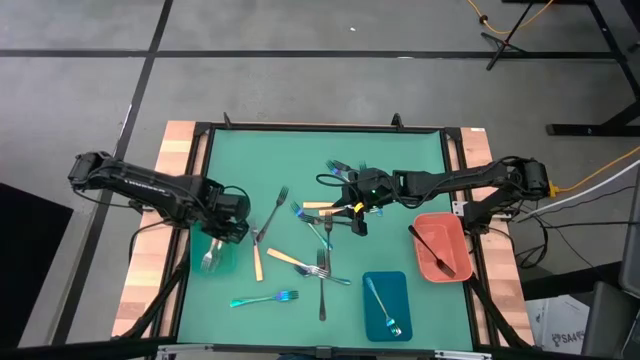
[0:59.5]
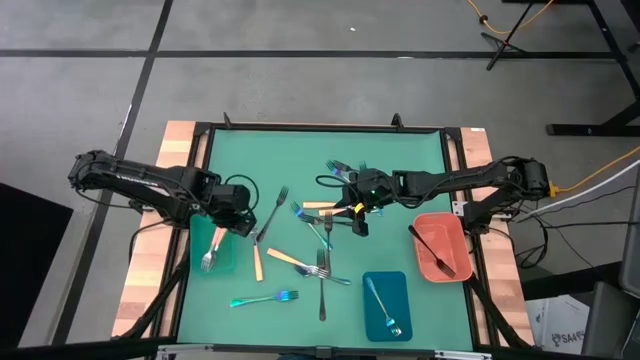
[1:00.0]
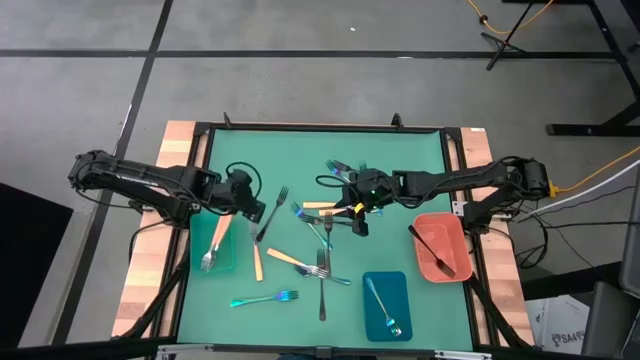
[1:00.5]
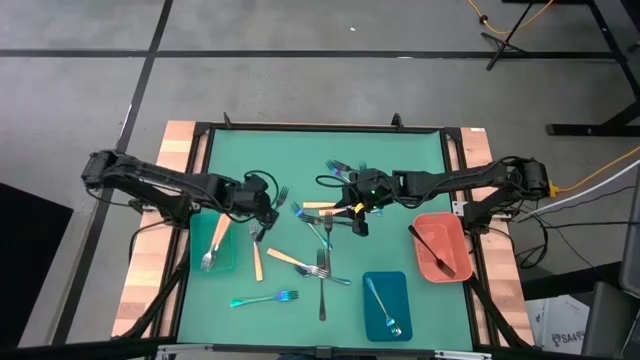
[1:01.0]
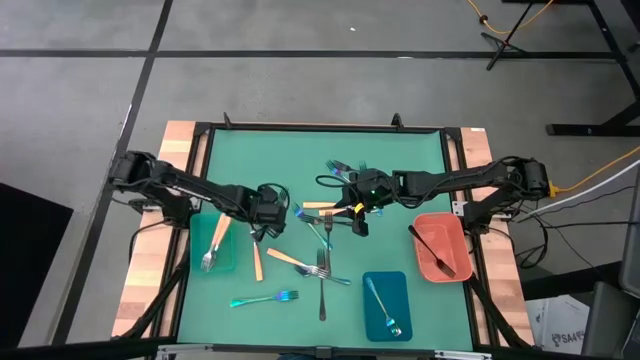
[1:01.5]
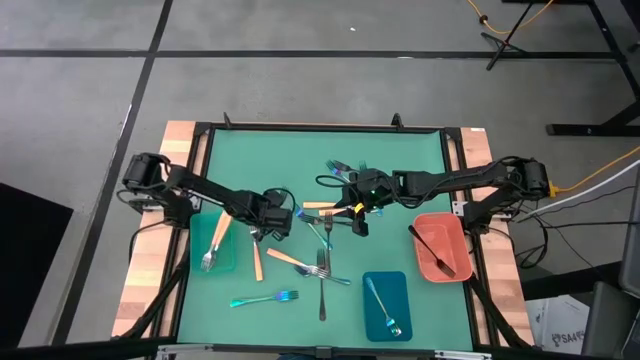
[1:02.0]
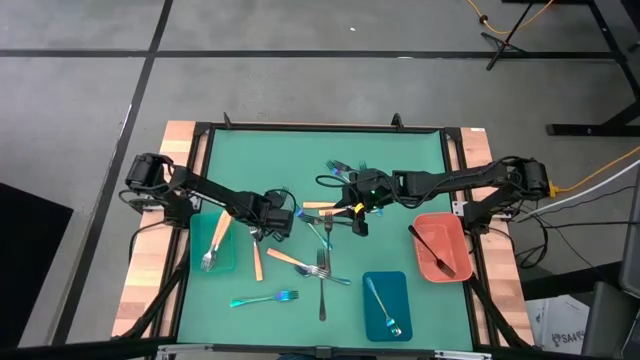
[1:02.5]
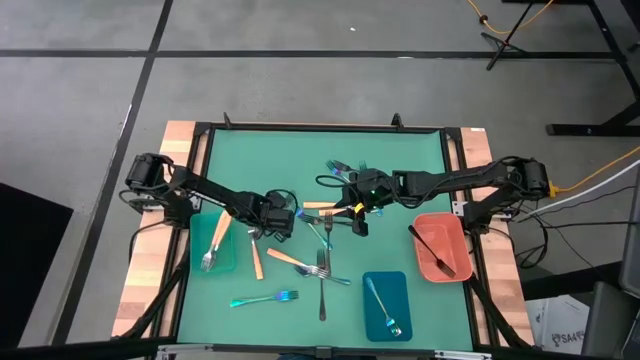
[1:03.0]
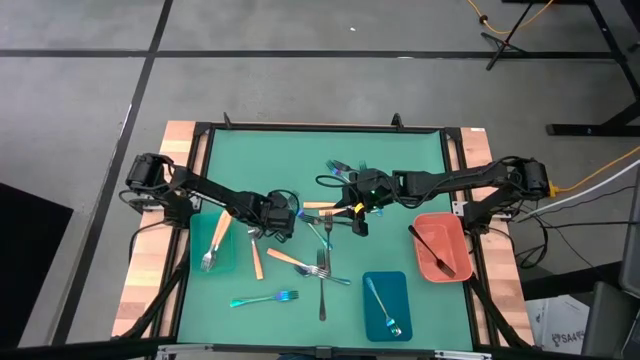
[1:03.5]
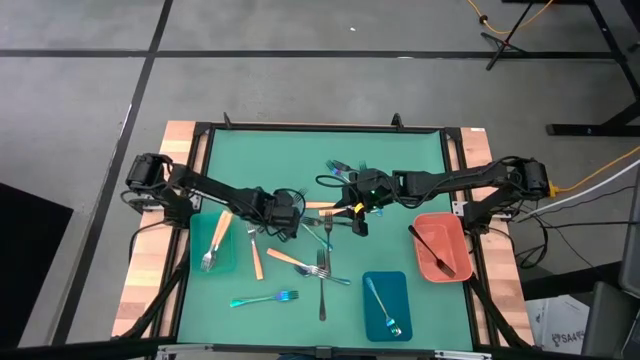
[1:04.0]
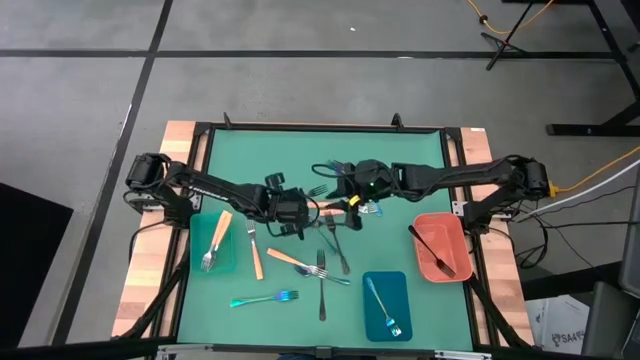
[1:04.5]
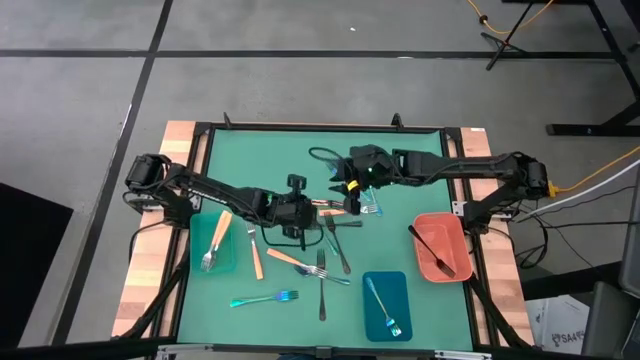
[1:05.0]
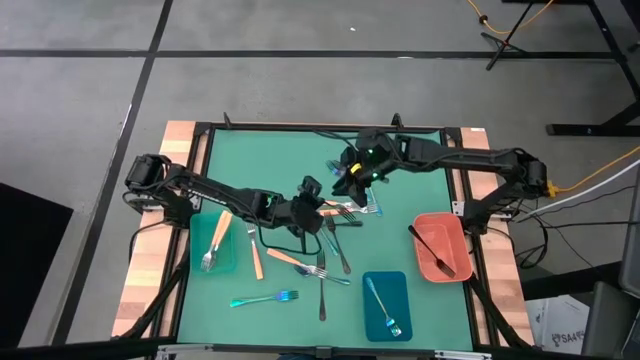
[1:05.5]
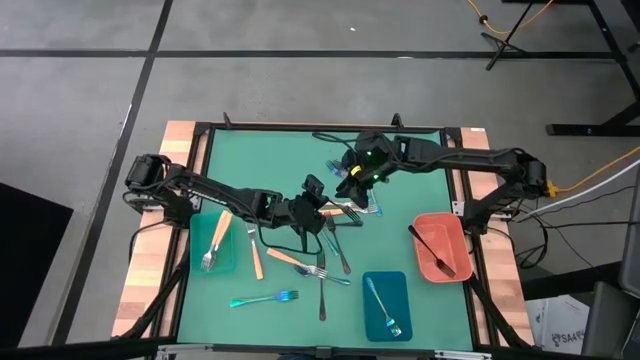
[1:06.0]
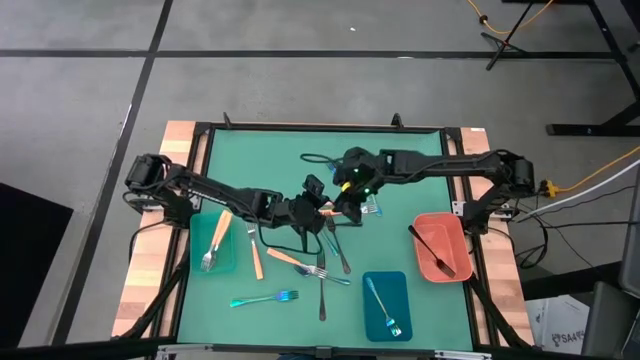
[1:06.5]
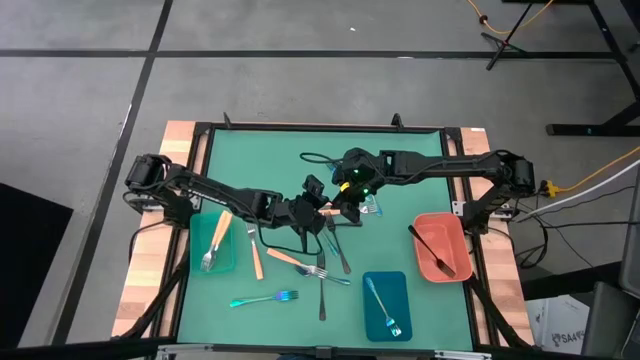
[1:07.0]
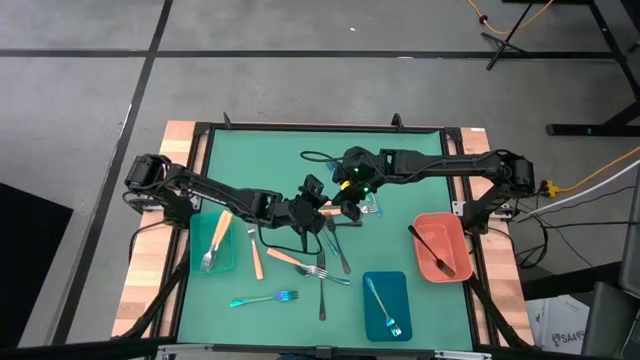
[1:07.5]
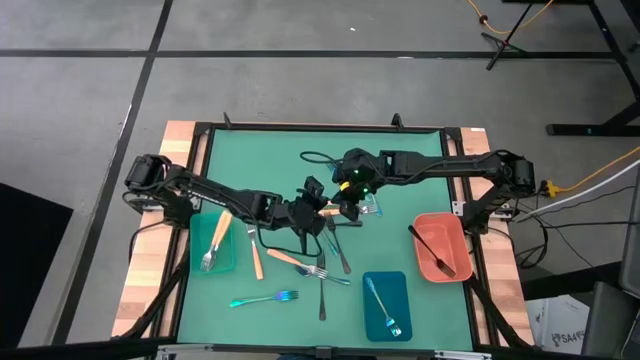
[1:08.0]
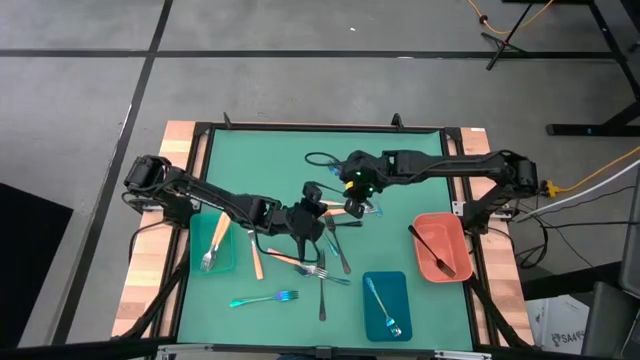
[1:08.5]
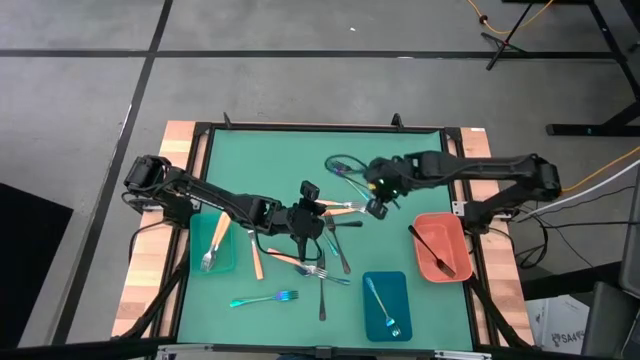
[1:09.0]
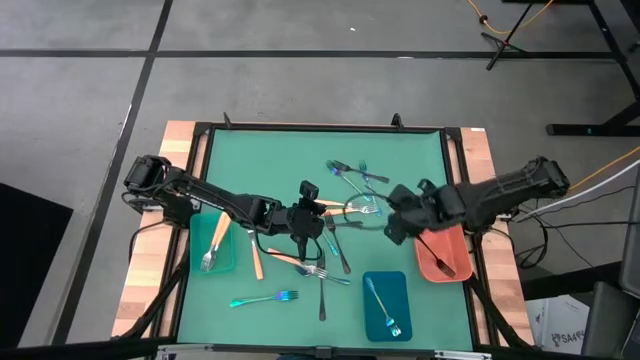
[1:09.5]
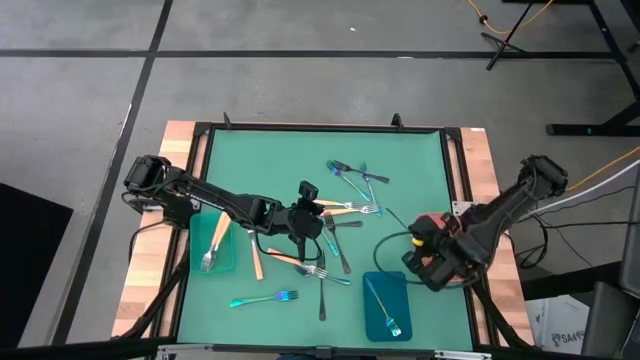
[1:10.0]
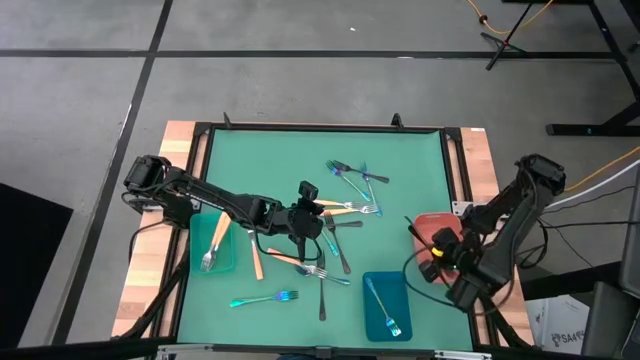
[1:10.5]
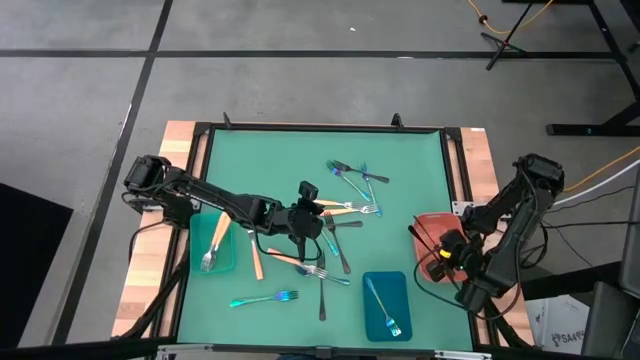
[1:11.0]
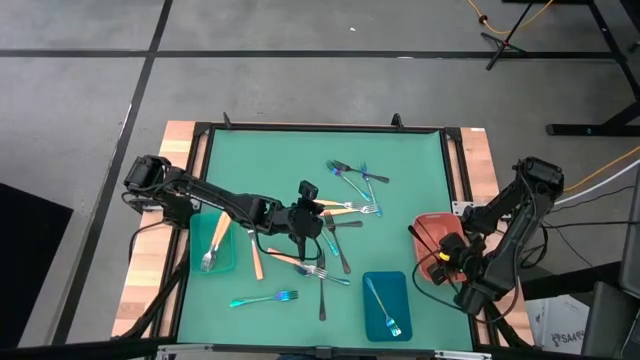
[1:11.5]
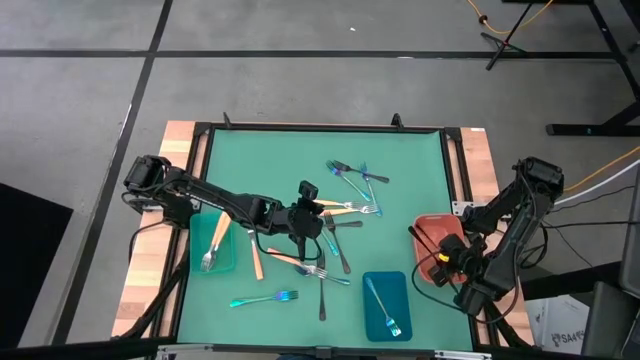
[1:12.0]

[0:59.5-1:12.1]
Task: Sort silverware by color (type)
Put the black fork into the orange bin

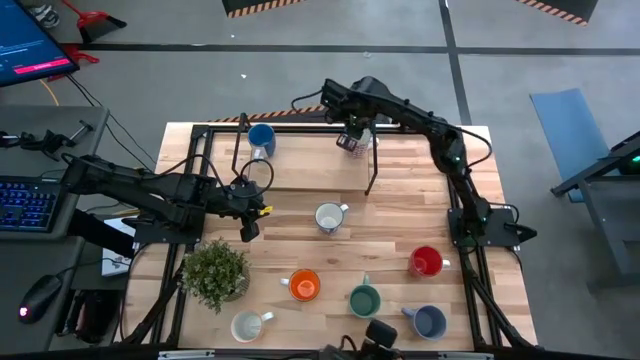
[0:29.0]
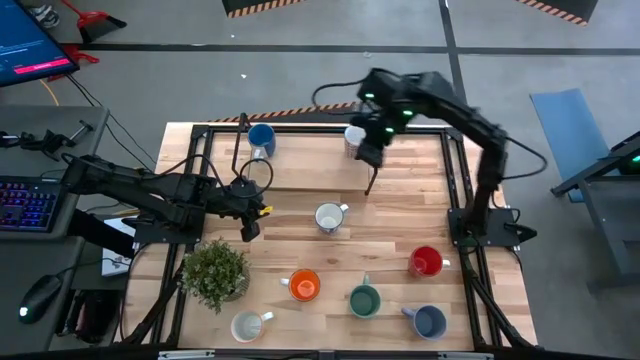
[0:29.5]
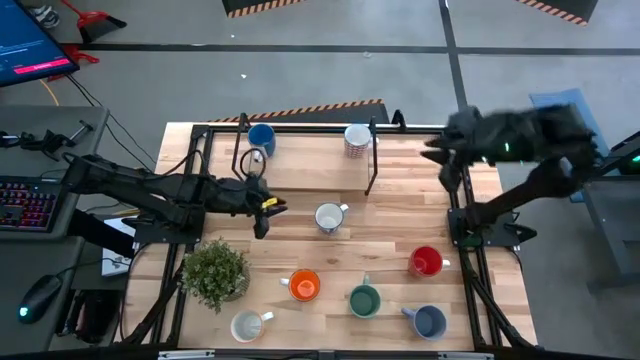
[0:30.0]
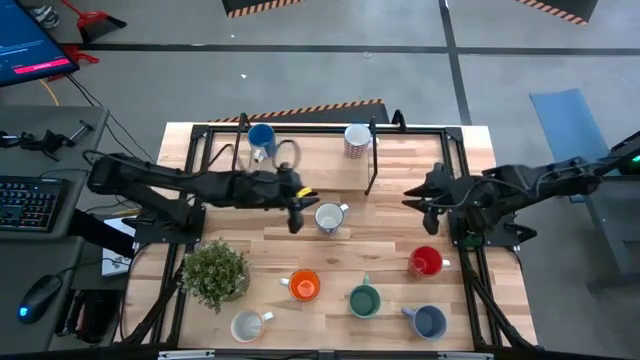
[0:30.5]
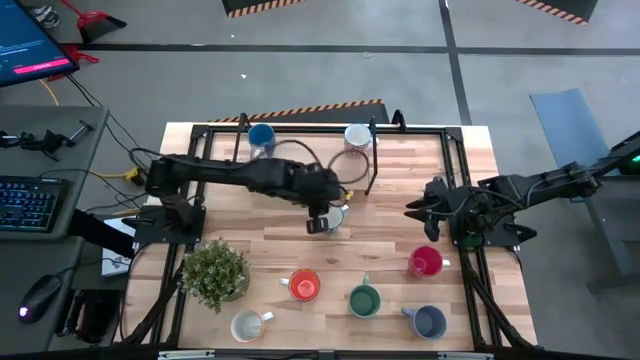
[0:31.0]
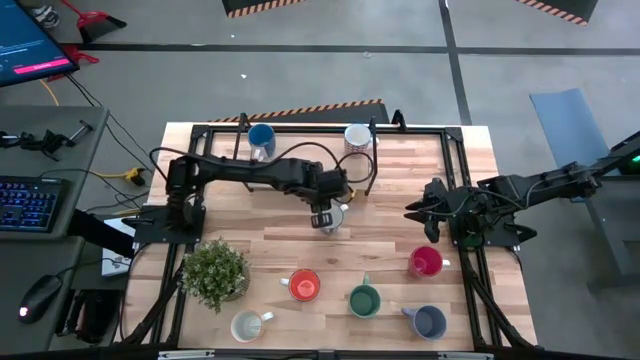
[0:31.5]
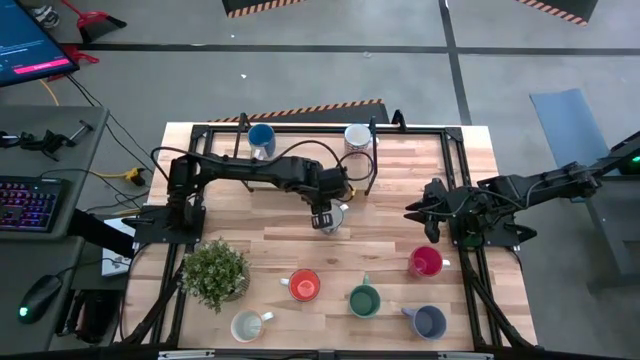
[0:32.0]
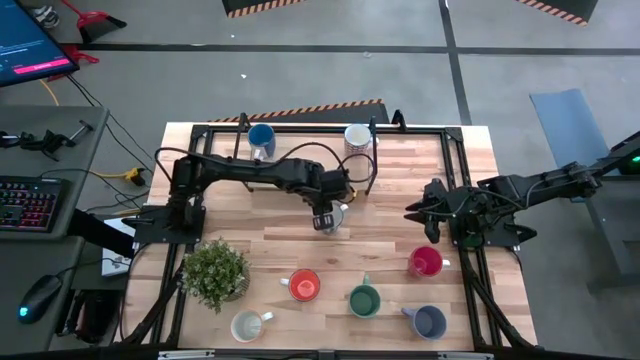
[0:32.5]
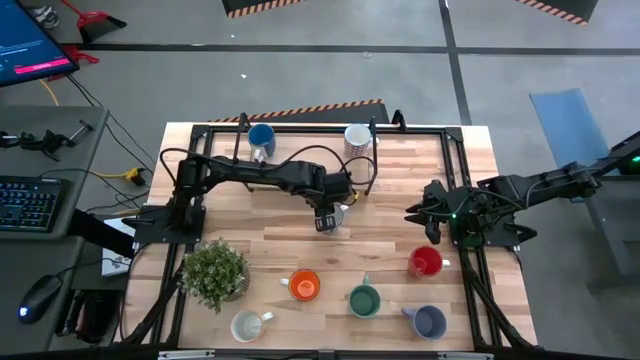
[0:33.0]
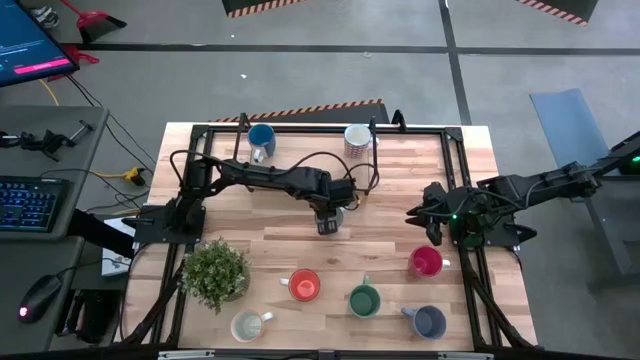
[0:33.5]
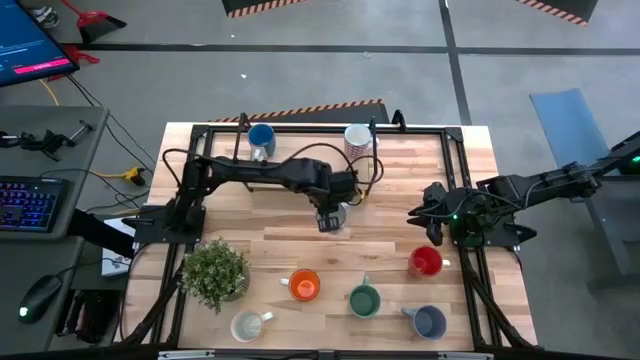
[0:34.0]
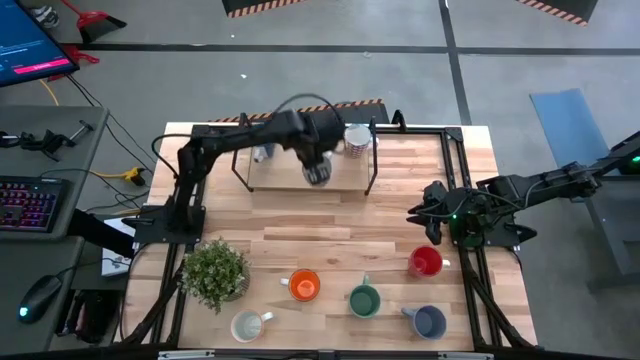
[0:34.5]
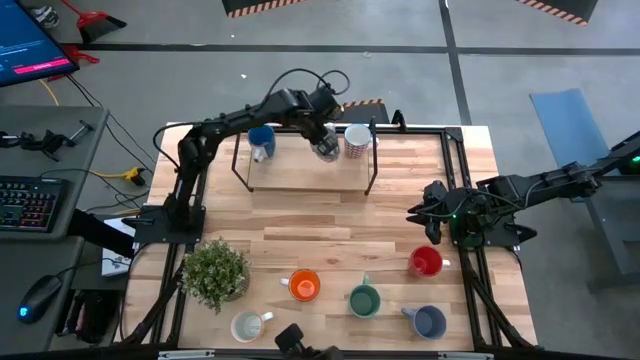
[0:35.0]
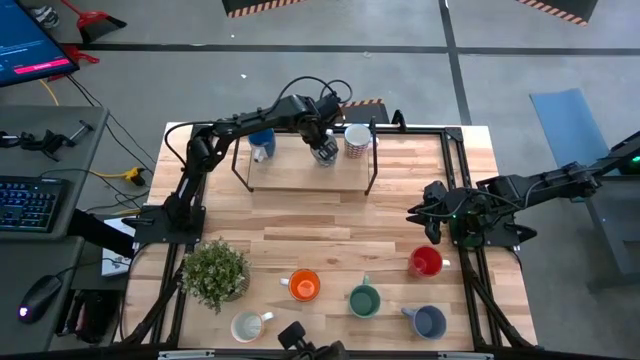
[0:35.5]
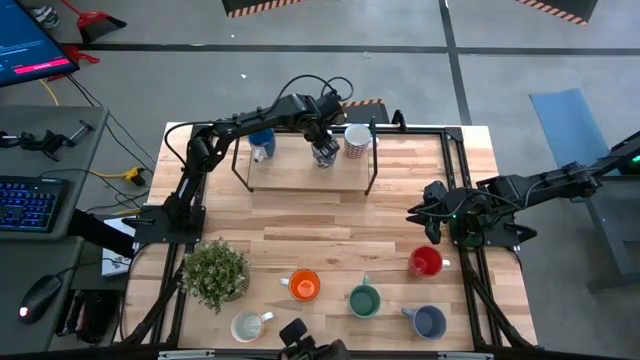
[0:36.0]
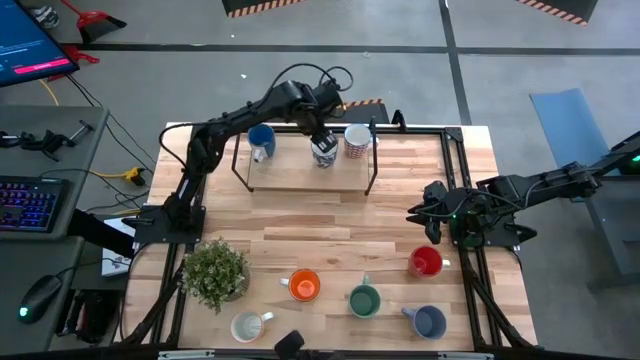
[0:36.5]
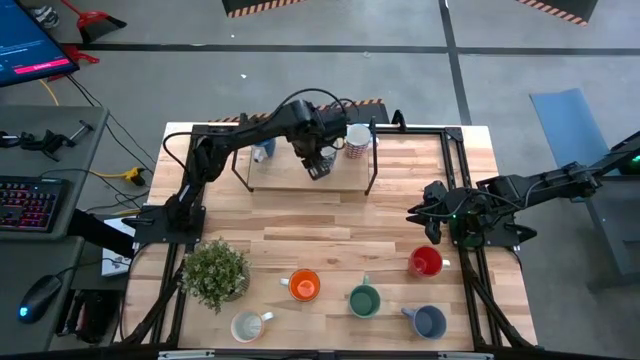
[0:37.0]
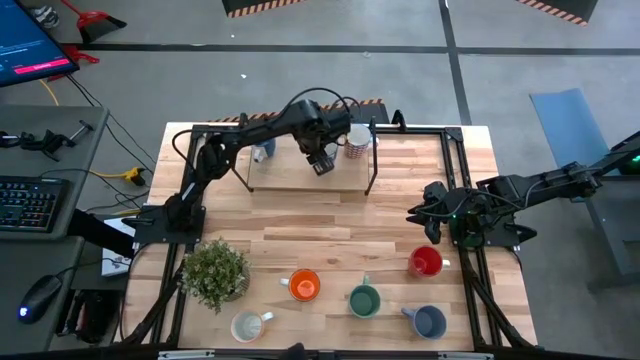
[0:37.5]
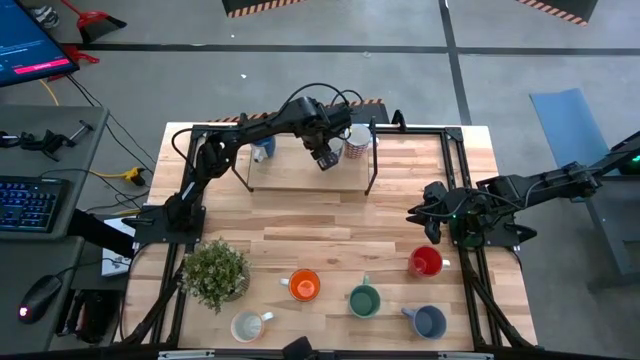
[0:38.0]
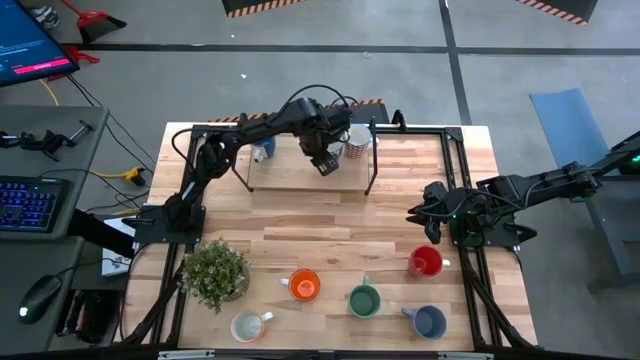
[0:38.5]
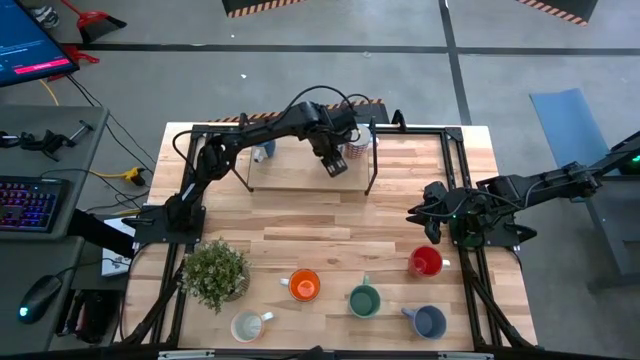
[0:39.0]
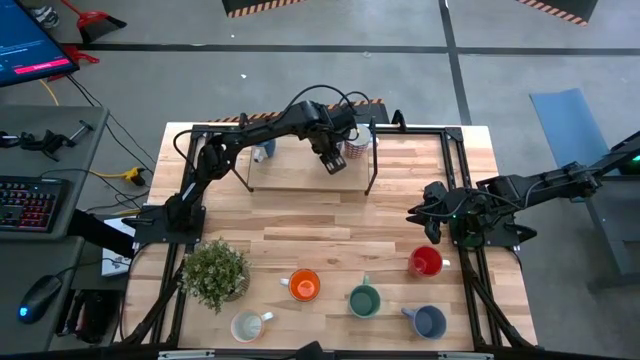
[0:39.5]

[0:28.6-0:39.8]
Task: Place coffee mugs
Put the blue pattern mug on the shelf
